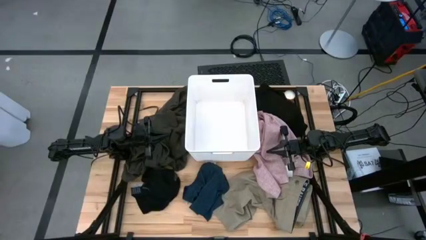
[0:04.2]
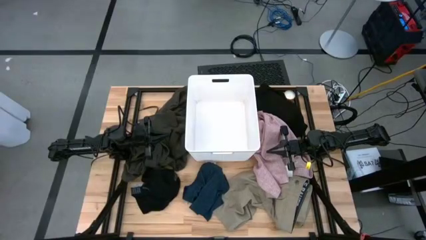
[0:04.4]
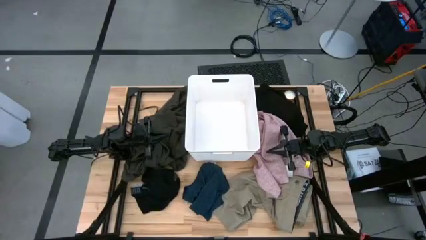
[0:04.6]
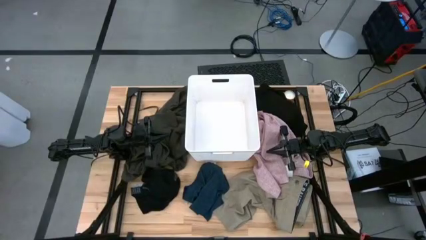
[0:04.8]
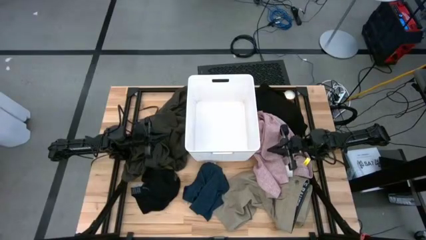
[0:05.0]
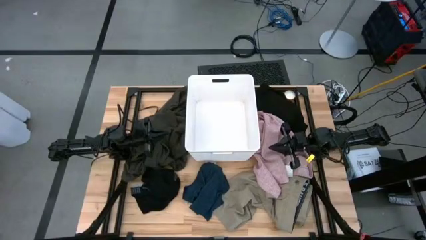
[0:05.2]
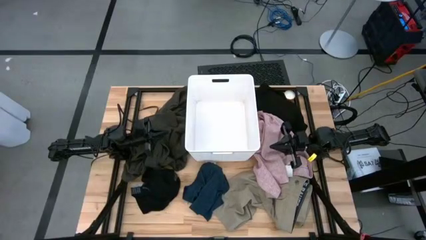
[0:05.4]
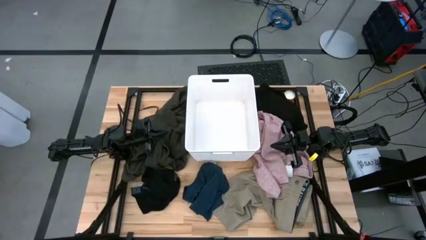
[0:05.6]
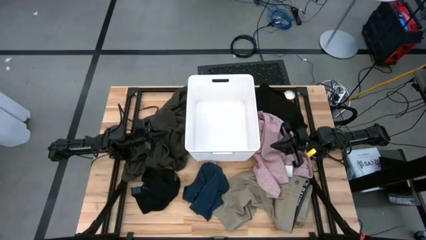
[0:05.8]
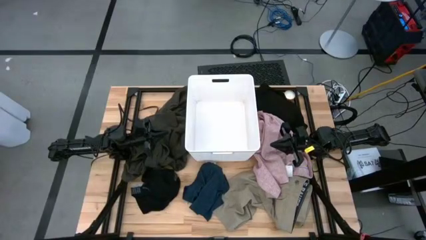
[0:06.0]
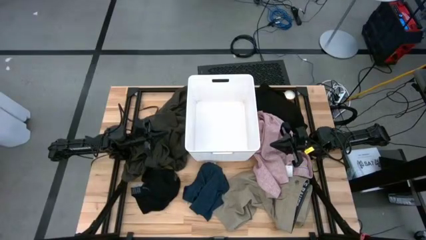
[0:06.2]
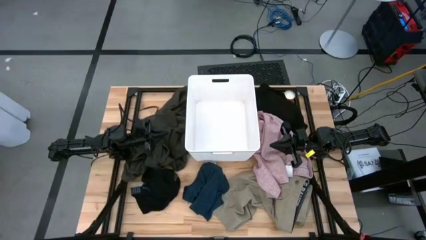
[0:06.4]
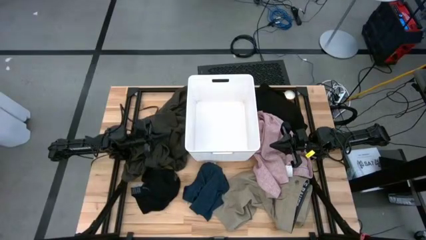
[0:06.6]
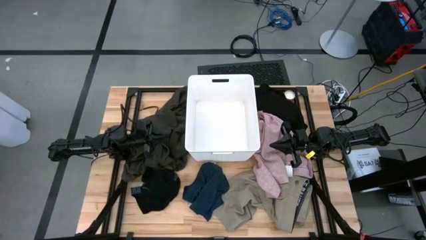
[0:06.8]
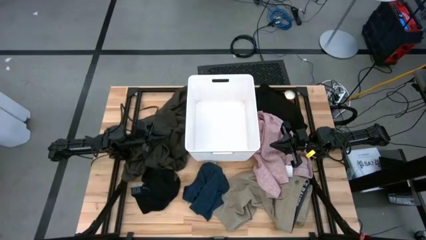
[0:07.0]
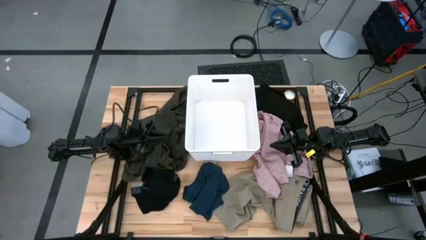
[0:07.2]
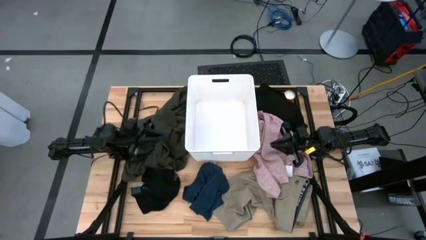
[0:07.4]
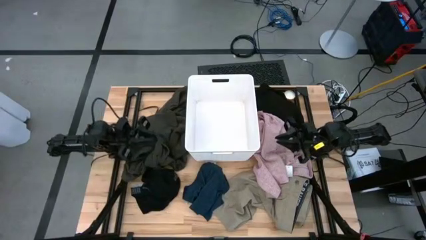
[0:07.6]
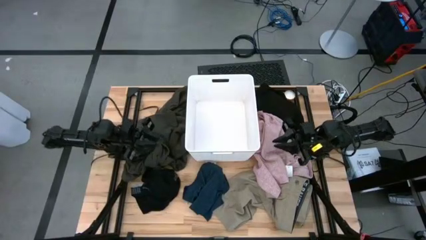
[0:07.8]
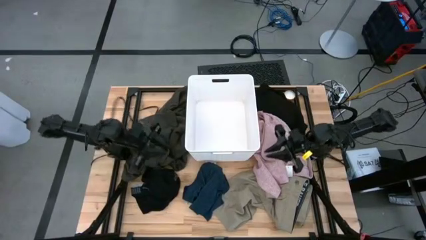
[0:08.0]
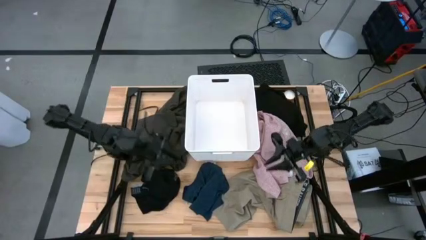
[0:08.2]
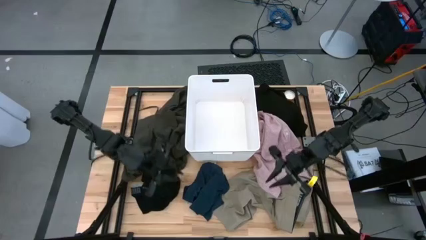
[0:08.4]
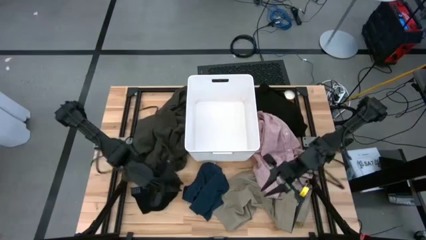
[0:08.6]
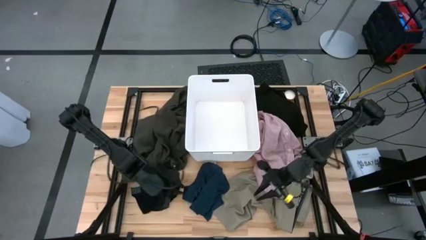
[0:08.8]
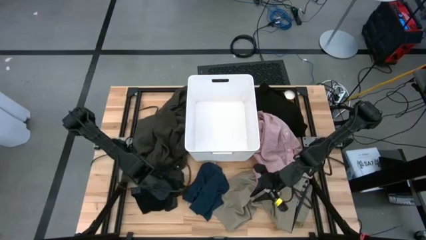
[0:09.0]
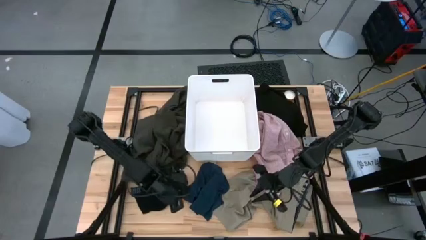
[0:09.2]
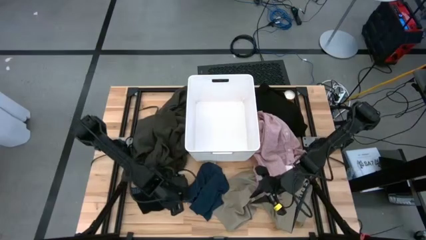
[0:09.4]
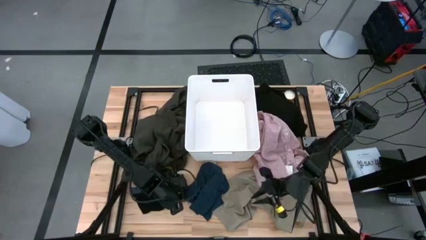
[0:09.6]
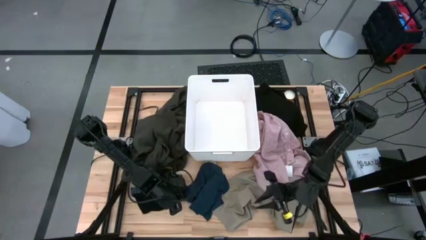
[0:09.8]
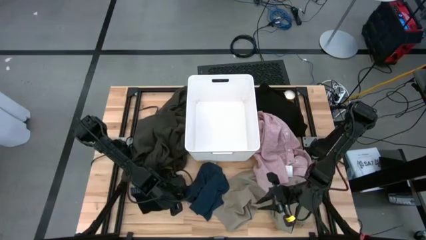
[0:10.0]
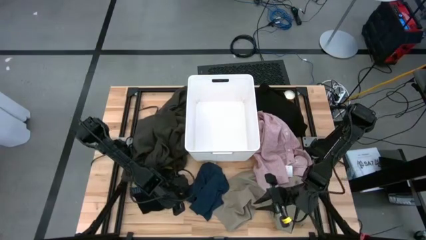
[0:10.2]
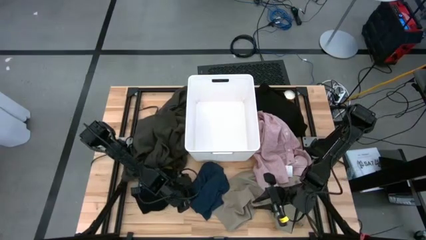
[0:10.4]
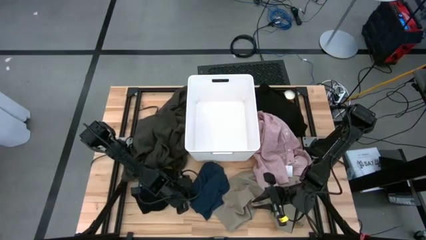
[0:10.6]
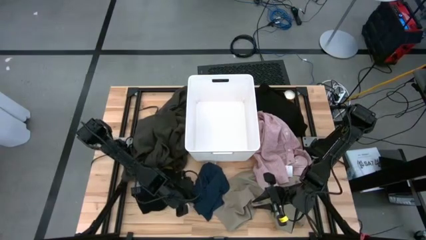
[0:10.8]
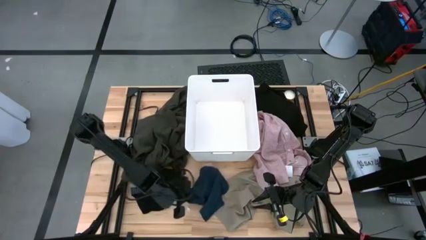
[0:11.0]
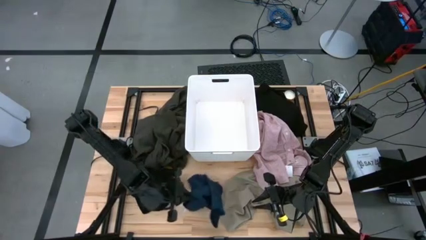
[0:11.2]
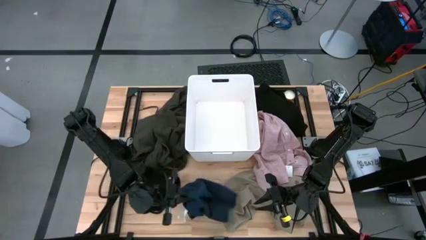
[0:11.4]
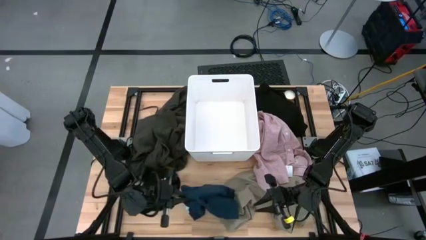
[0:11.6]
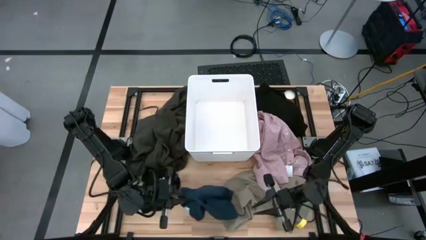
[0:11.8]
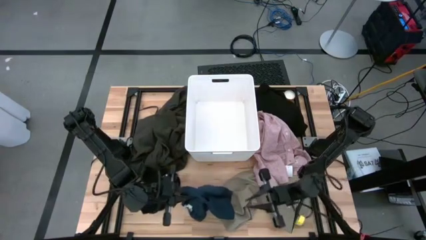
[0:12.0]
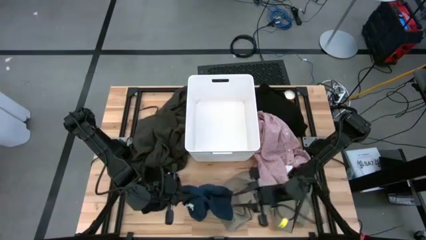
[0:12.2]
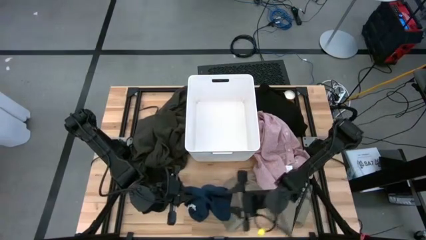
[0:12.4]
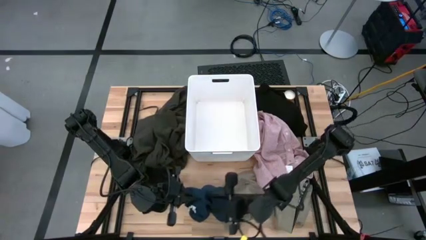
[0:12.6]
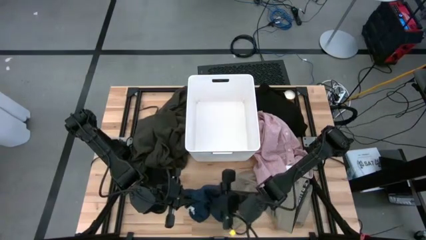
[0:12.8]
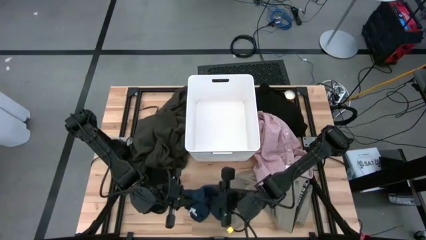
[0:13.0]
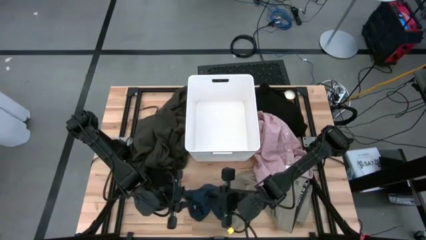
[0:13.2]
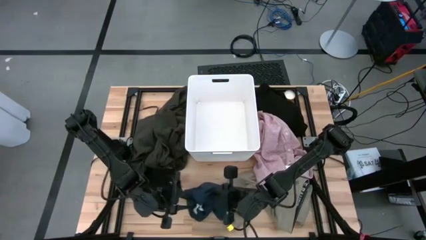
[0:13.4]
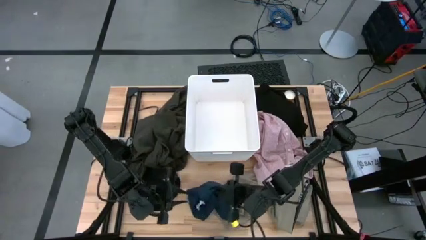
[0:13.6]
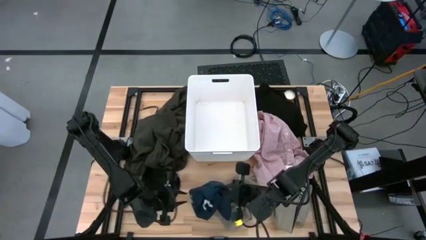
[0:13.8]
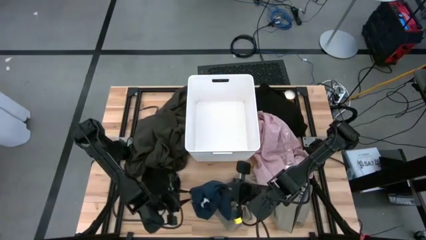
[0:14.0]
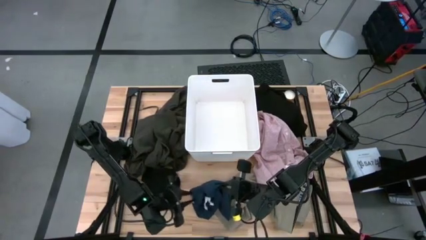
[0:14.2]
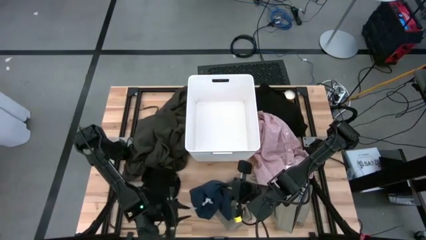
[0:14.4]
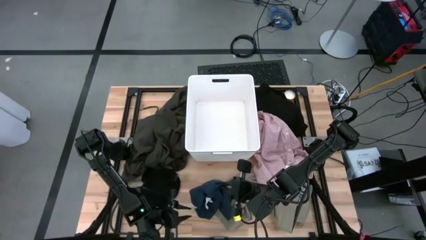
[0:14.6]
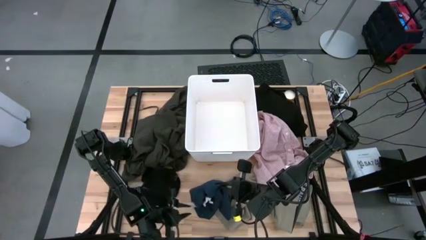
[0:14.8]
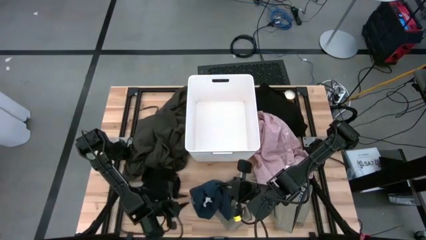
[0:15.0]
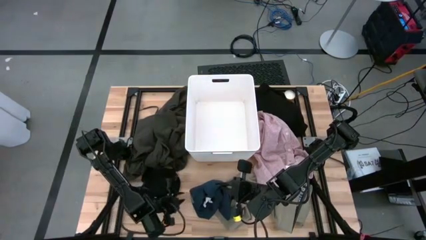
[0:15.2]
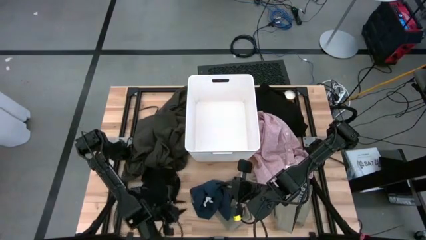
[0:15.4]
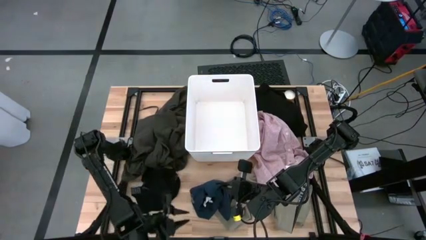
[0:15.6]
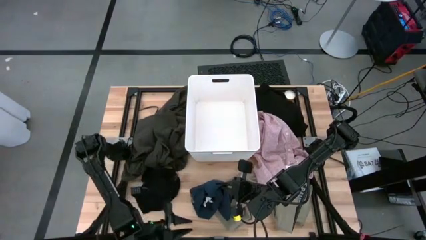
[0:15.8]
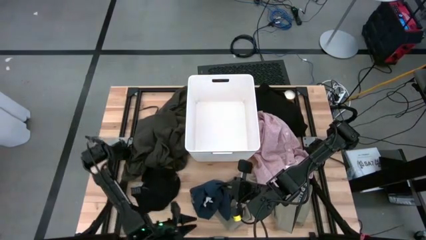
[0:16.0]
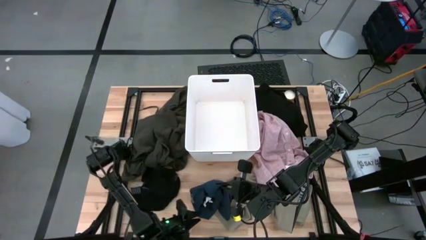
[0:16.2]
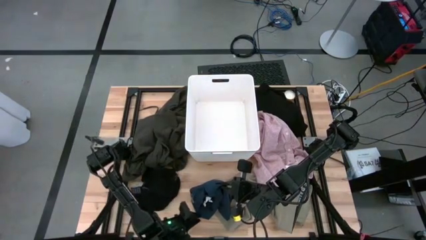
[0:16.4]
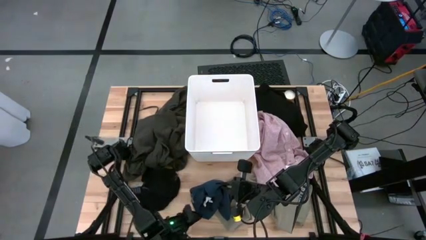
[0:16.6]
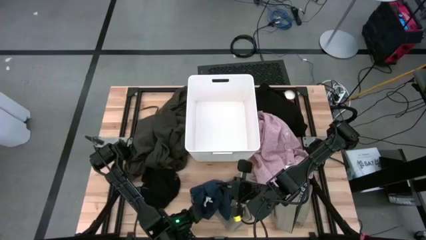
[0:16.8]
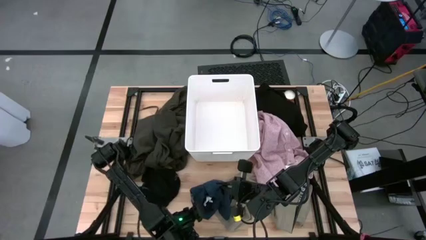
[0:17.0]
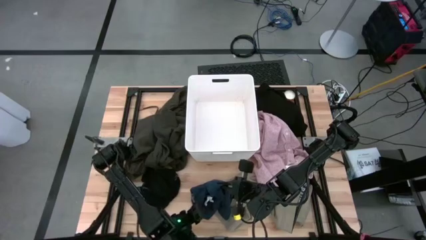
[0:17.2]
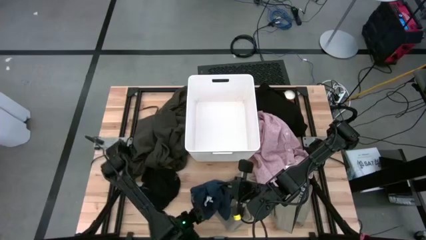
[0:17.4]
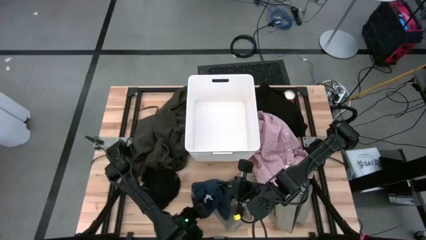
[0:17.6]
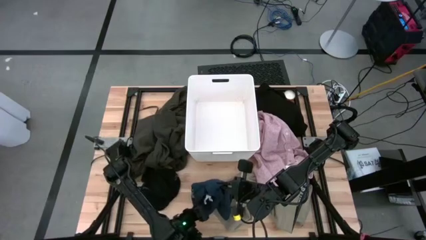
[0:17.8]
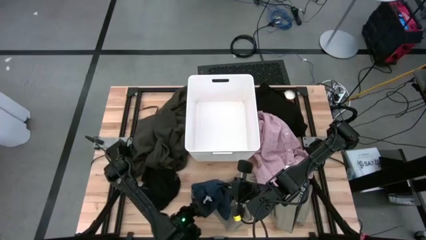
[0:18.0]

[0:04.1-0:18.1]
Task: Sort clothes
Put the blue shorts into the white laundry bin
